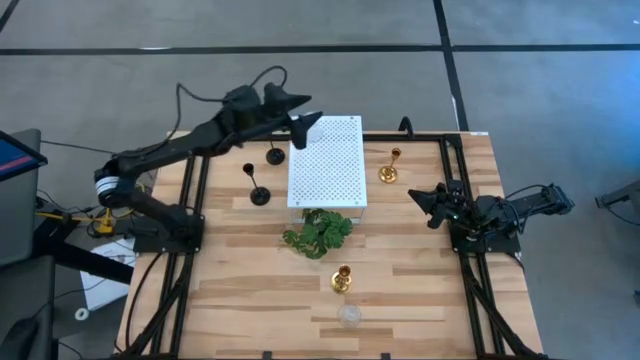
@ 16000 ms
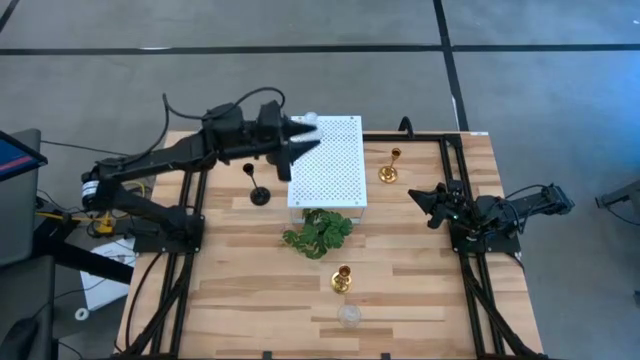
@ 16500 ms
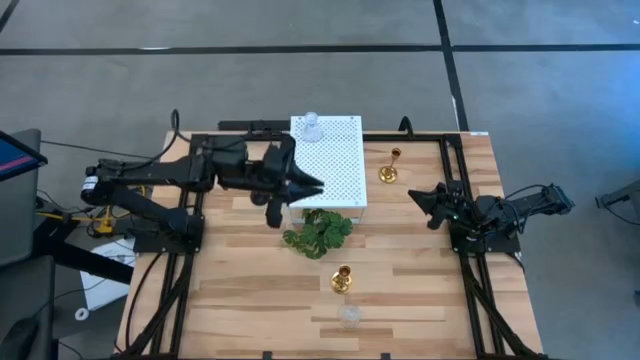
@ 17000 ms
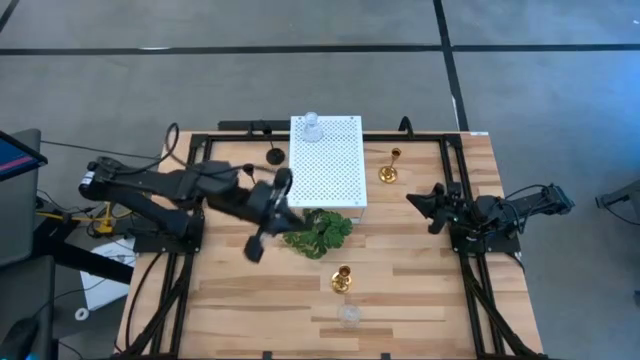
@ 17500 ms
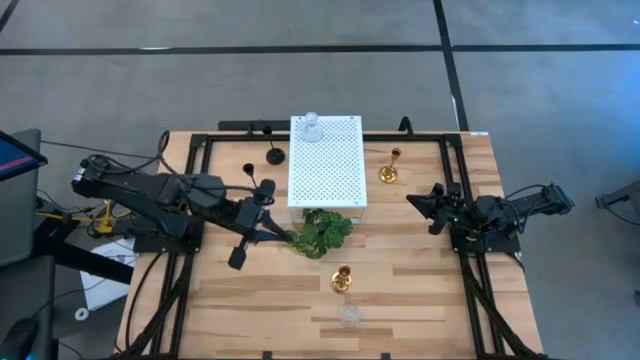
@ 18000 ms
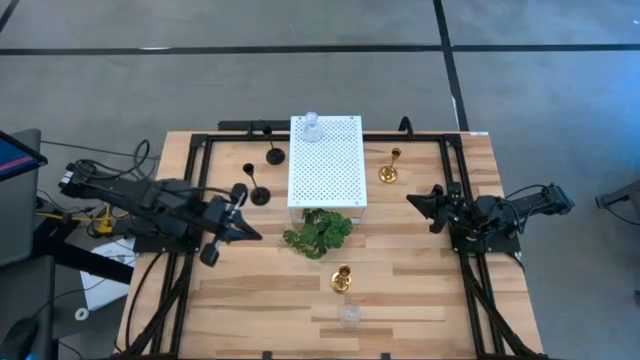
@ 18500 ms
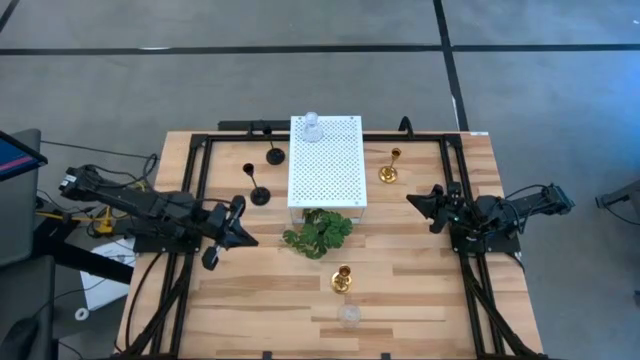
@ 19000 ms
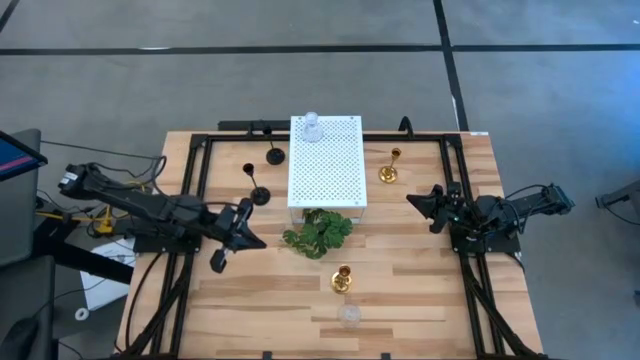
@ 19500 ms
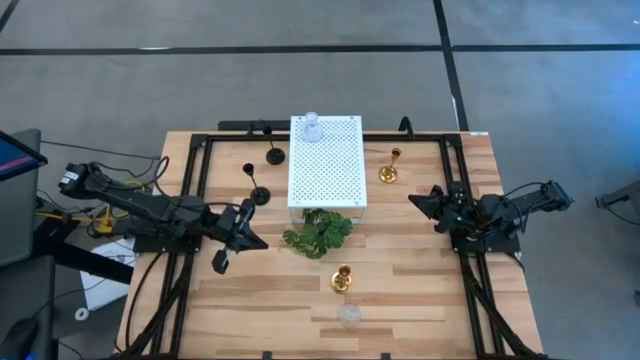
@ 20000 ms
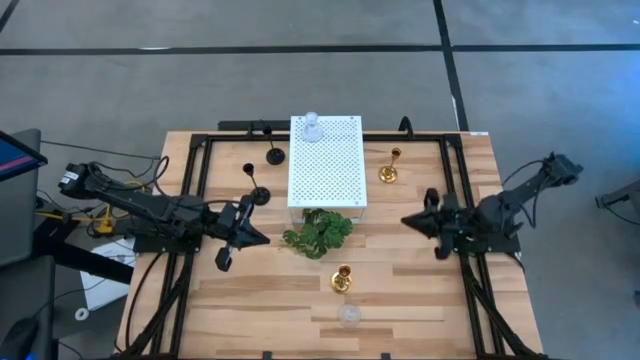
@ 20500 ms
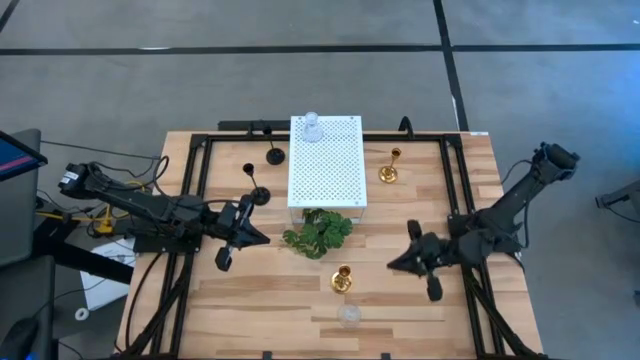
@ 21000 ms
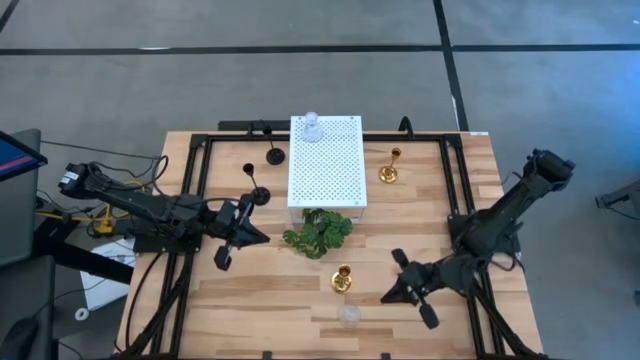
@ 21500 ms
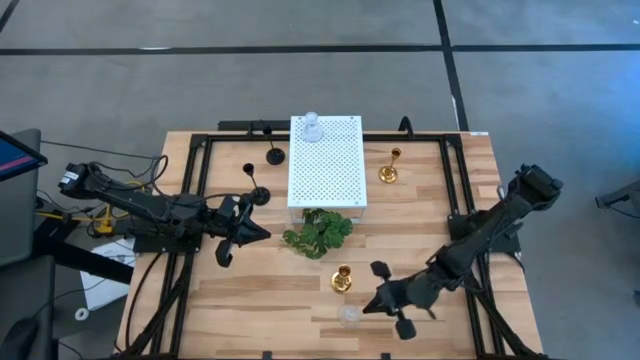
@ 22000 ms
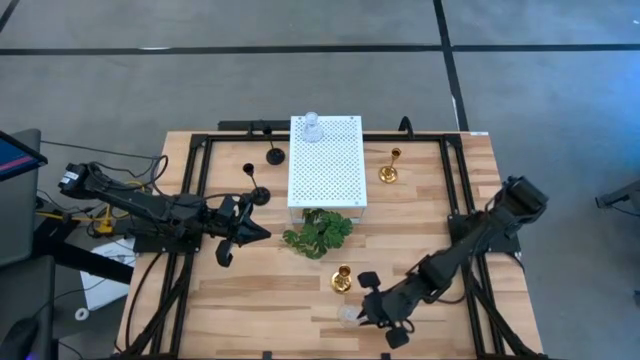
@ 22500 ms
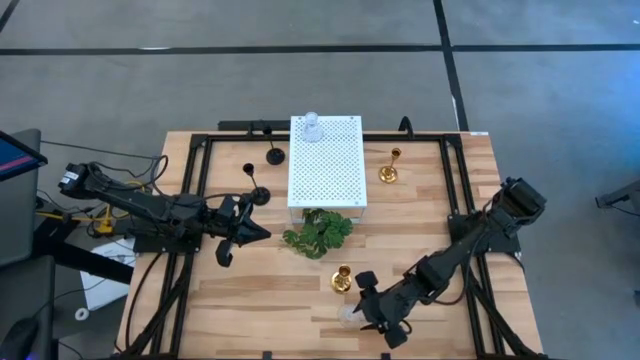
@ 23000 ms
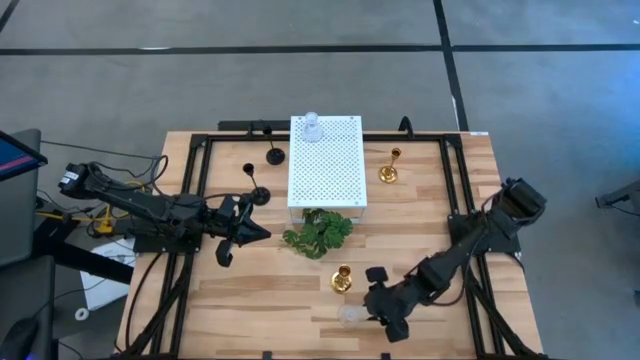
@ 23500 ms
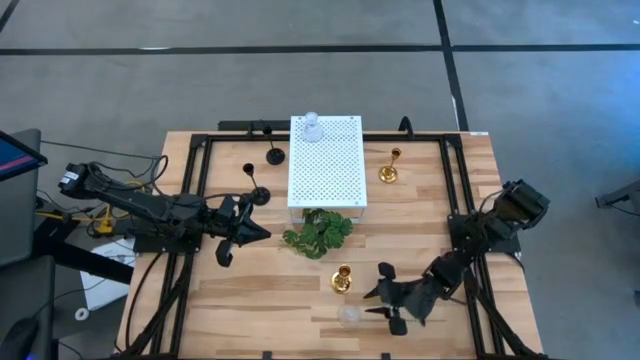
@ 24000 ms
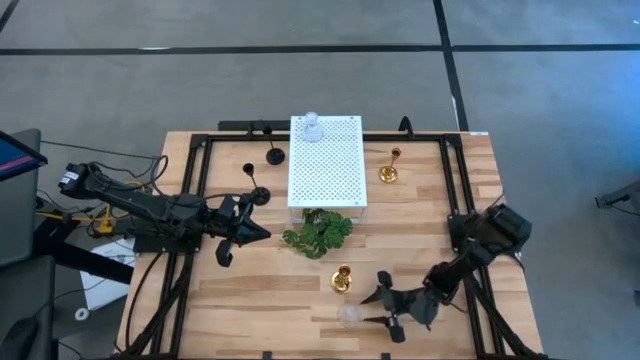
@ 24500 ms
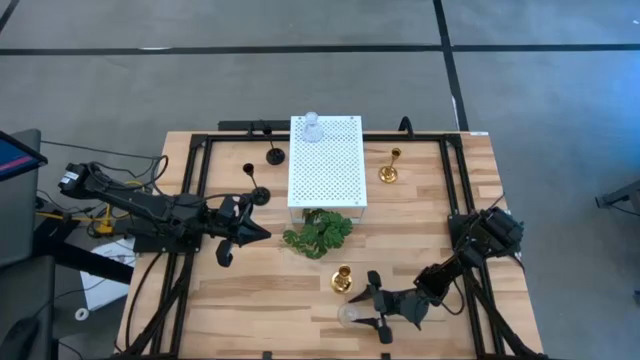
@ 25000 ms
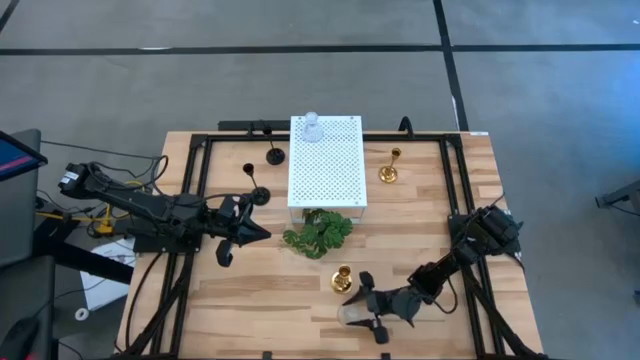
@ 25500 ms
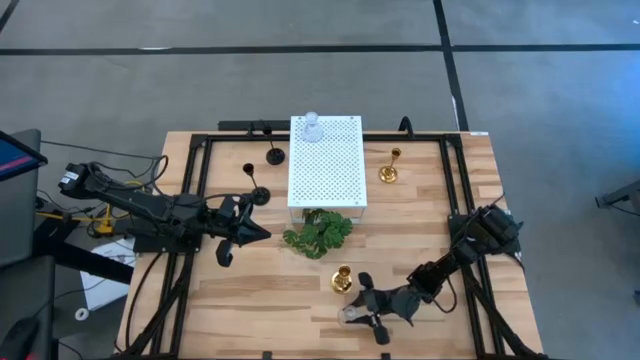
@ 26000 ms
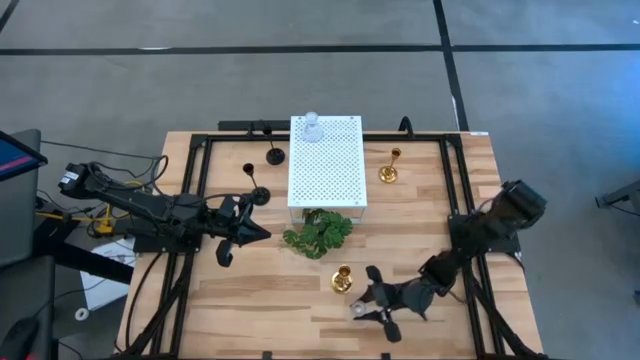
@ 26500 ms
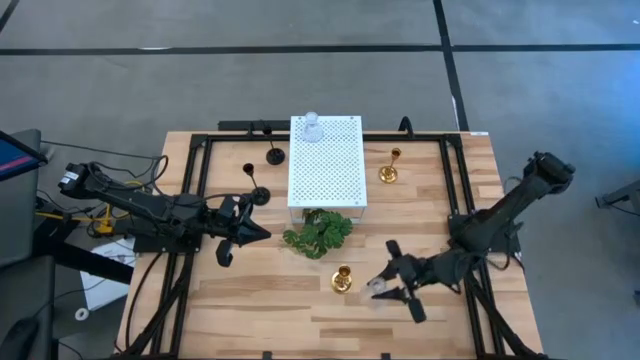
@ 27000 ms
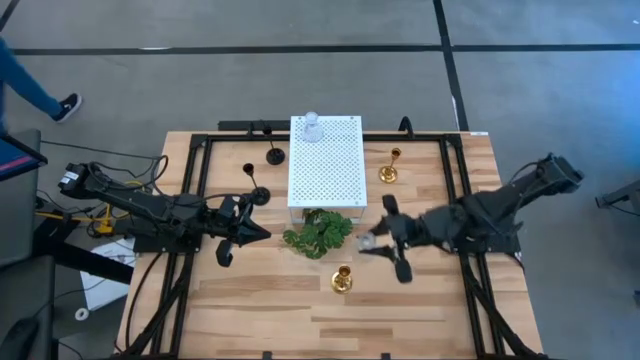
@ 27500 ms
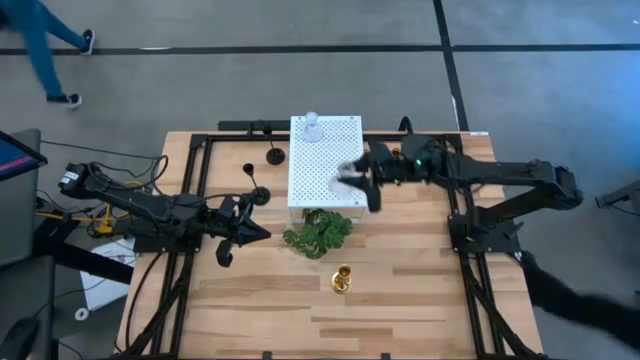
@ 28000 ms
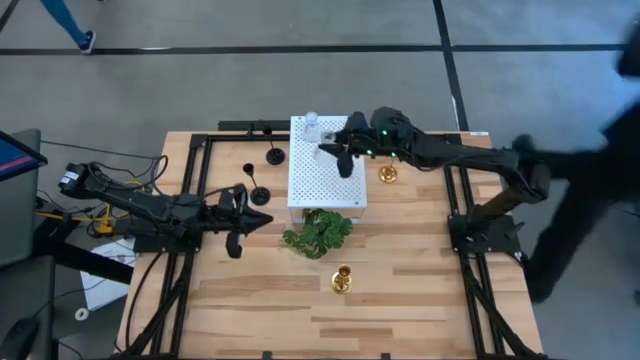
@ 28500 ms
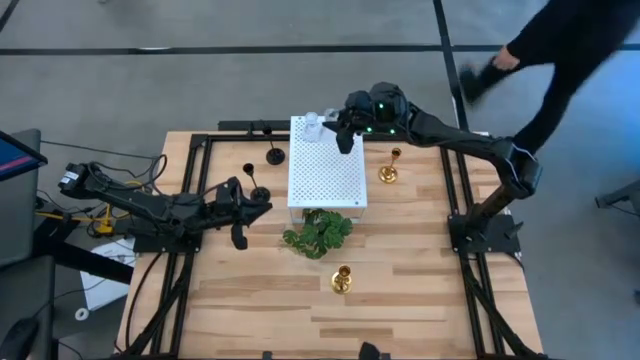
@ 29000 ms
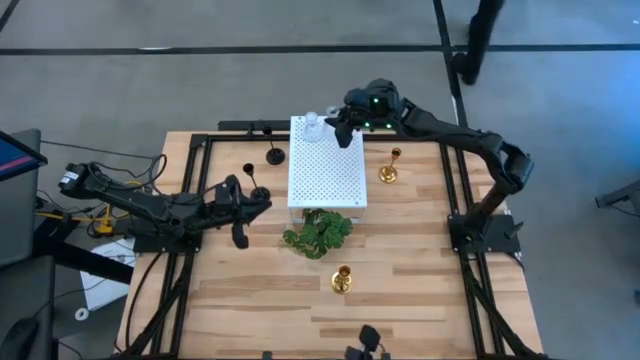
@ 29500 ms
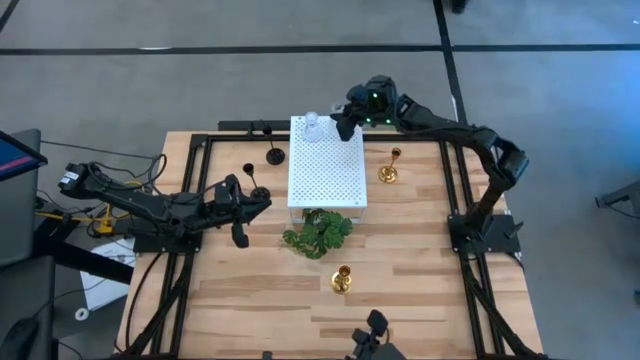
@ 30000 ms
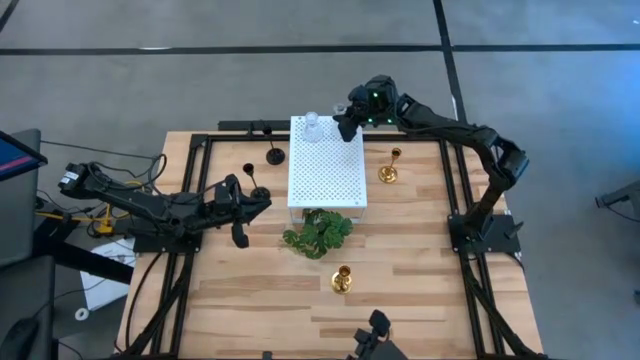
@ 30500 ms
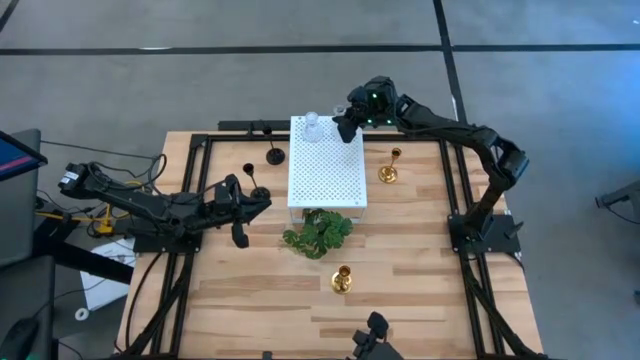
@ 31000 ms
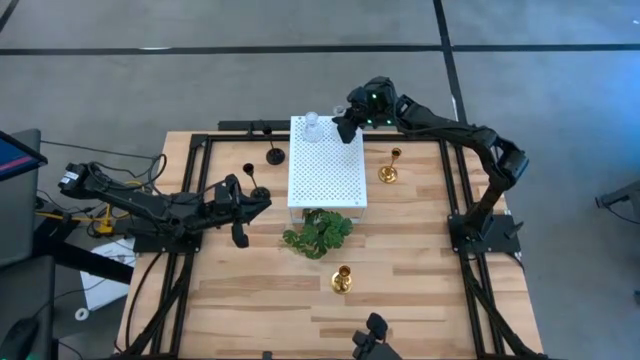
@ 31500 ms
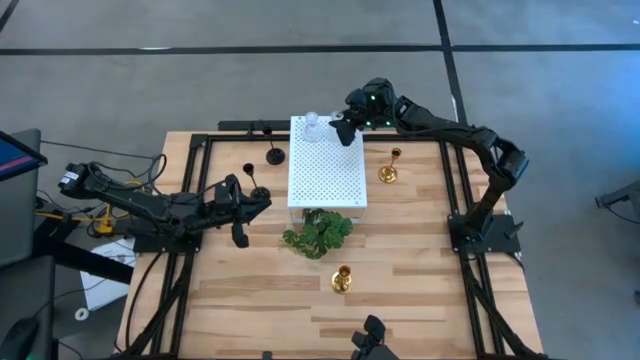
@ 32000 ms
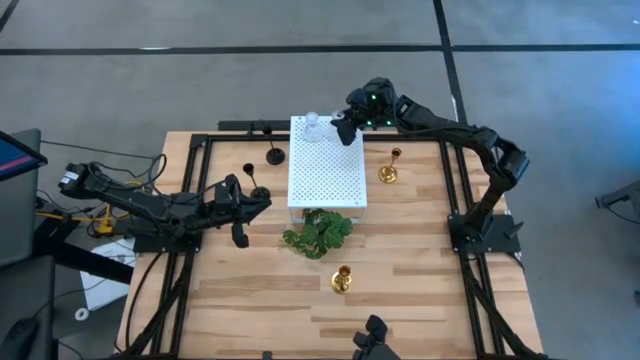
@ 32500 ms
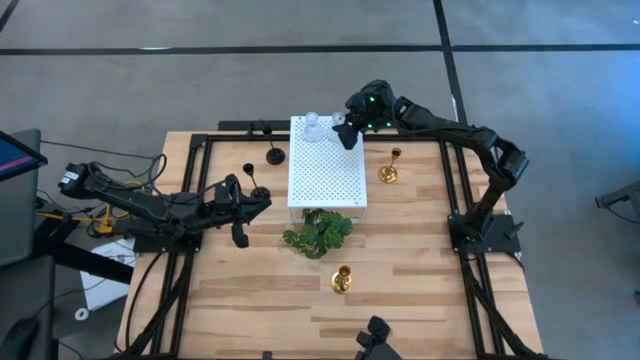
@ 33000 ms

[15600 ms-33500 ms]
Task: Pick & Place candle stick holders
Align the transparent candle holder with the other transparent candle holder on the shelf

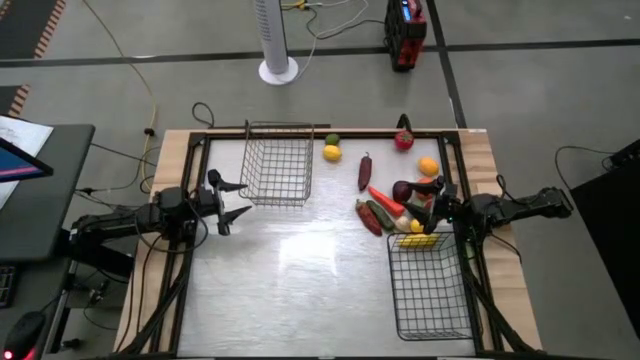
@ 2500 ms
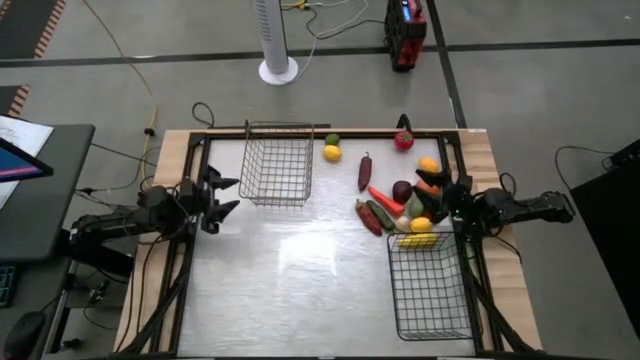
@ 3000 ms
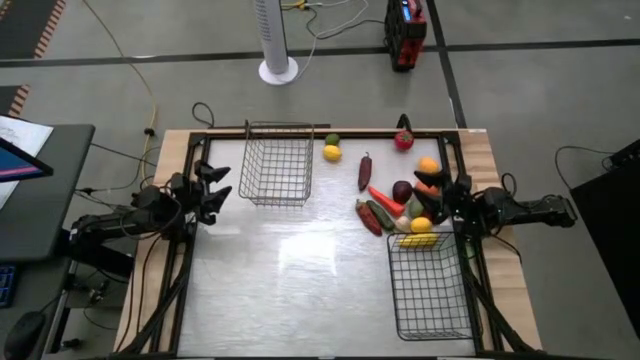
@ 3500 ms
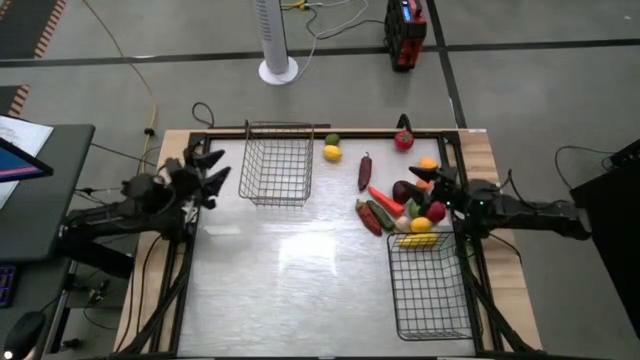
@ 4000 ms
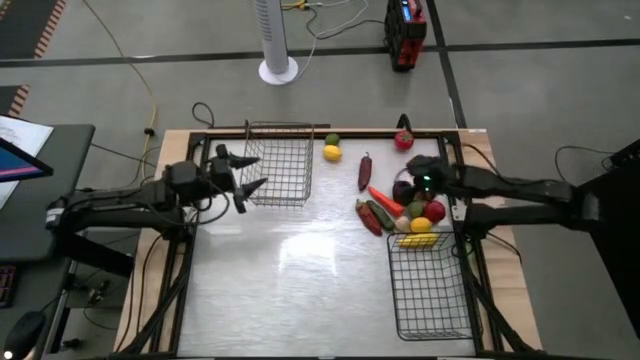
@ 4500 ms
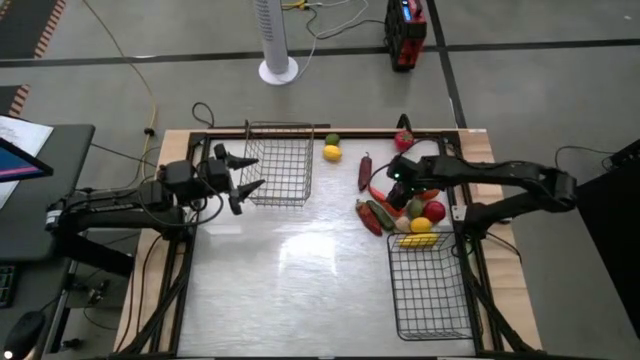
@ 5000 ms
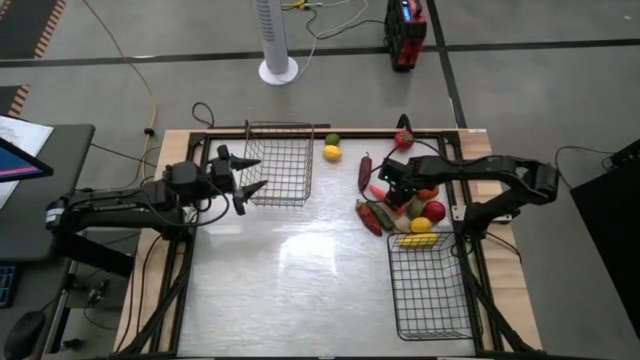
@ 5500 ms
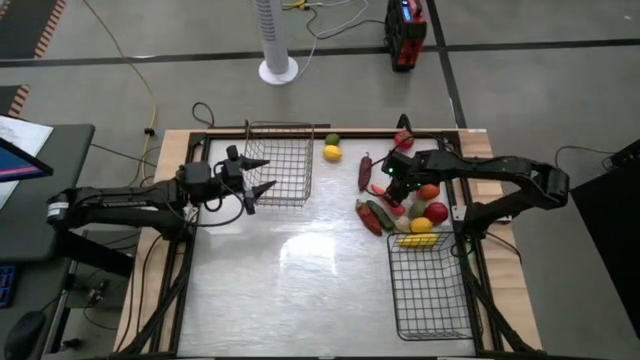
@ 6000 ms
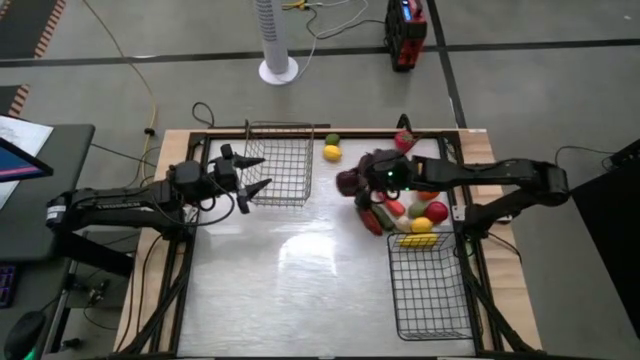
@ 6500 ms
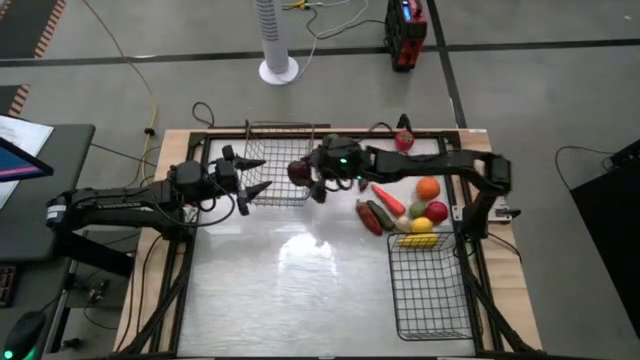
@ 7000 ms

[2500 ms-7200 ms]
Task: Sort produce into baskets
Put the apple into the left wire basket
